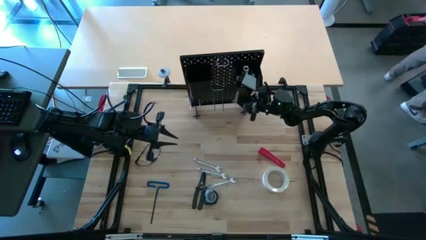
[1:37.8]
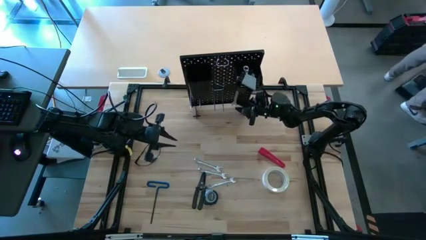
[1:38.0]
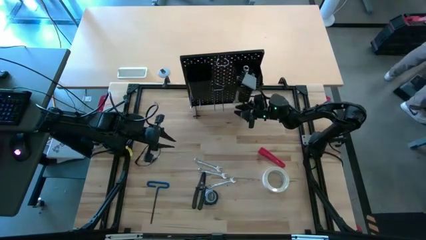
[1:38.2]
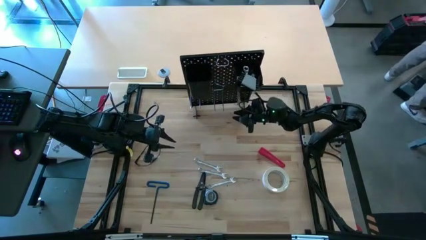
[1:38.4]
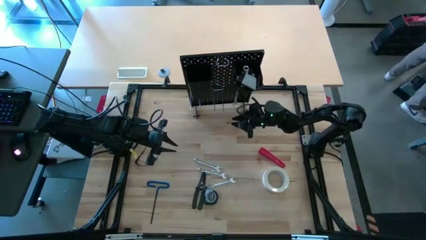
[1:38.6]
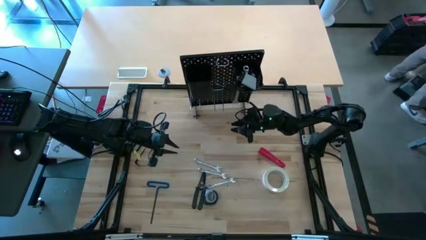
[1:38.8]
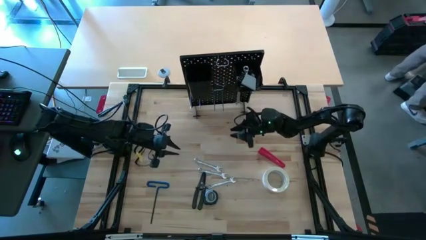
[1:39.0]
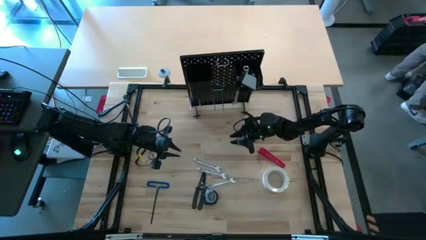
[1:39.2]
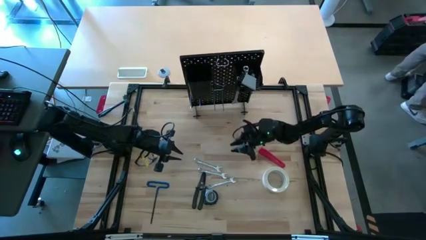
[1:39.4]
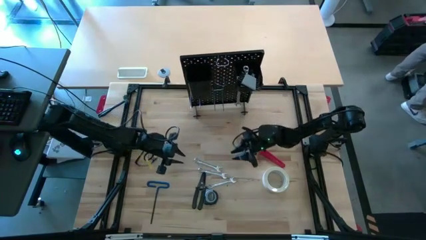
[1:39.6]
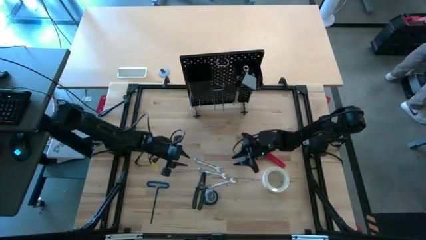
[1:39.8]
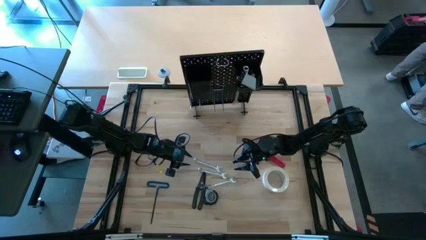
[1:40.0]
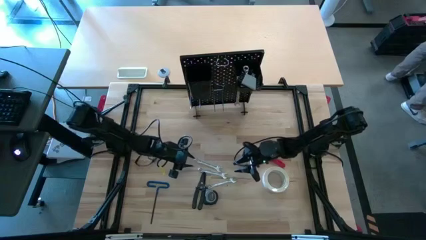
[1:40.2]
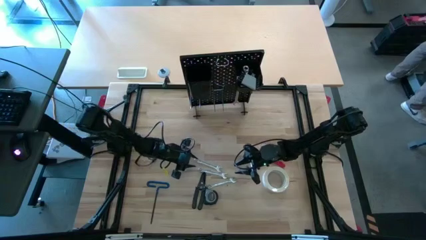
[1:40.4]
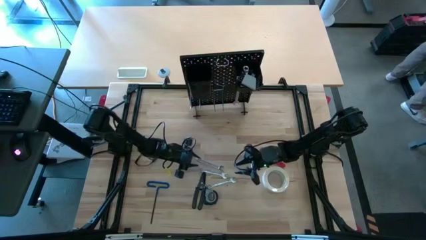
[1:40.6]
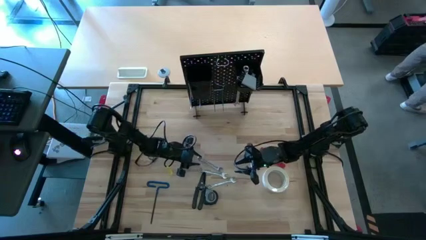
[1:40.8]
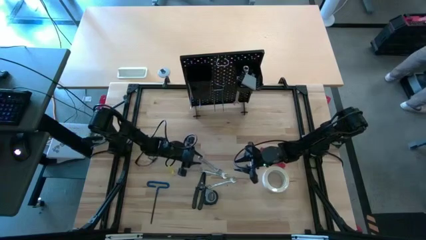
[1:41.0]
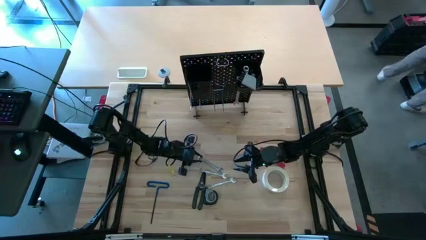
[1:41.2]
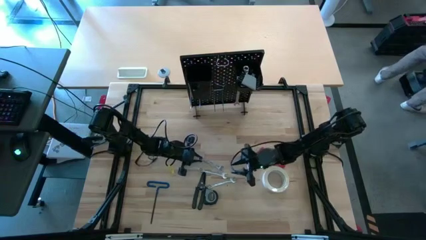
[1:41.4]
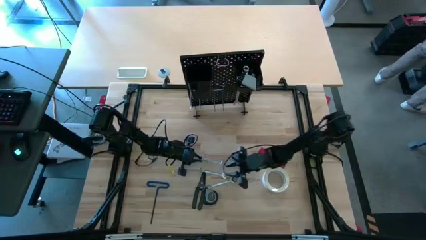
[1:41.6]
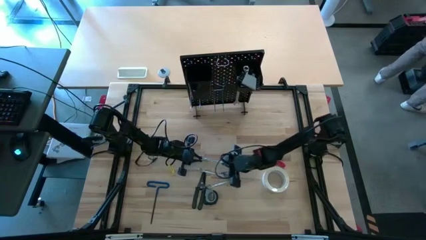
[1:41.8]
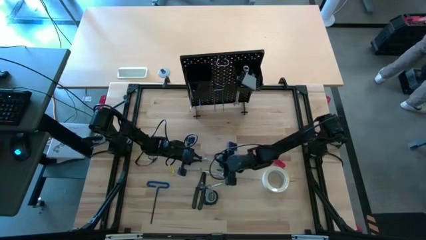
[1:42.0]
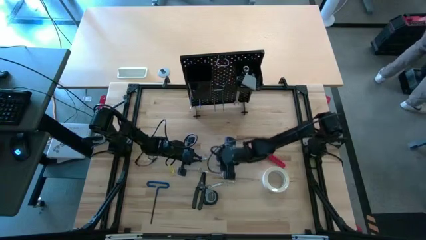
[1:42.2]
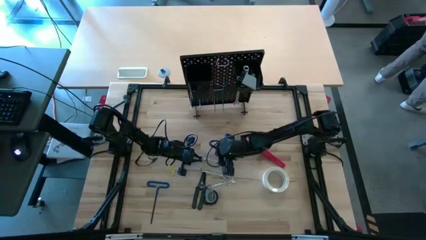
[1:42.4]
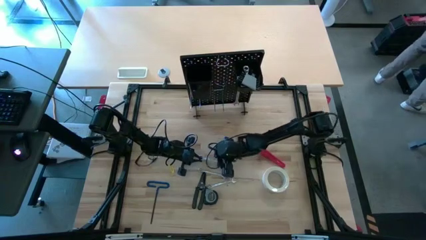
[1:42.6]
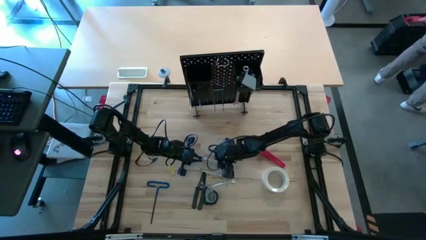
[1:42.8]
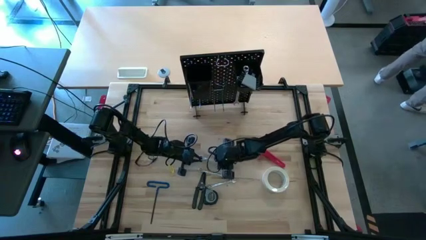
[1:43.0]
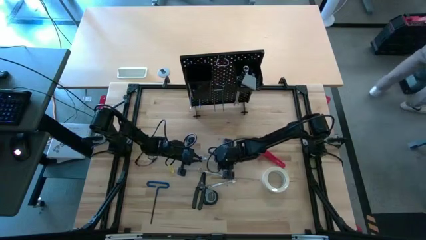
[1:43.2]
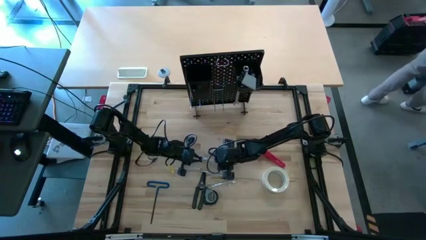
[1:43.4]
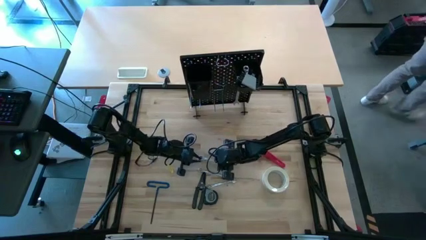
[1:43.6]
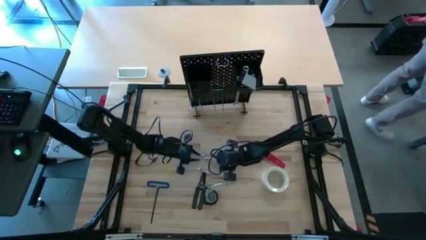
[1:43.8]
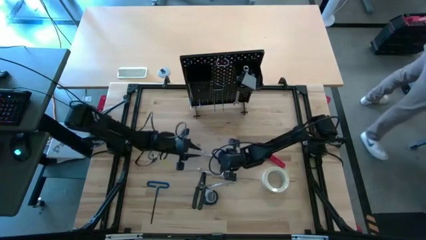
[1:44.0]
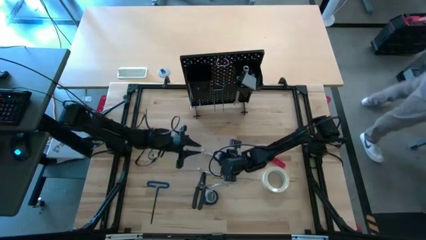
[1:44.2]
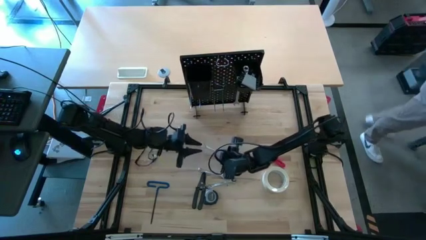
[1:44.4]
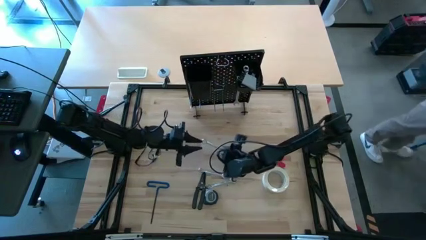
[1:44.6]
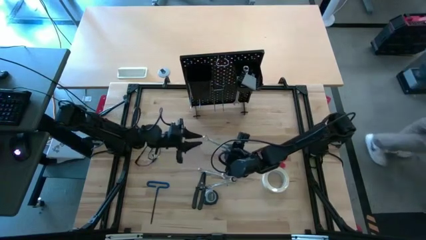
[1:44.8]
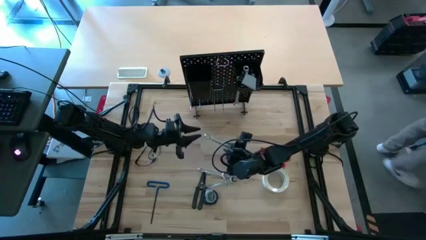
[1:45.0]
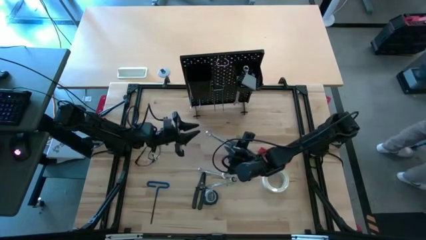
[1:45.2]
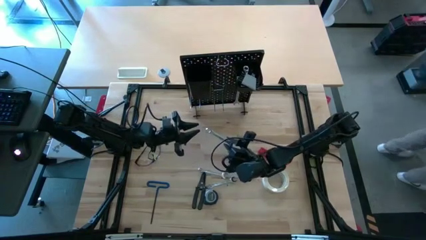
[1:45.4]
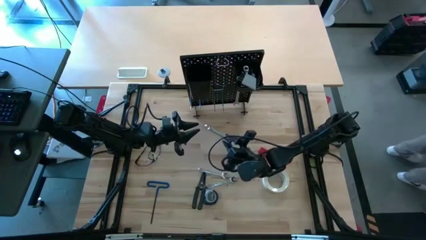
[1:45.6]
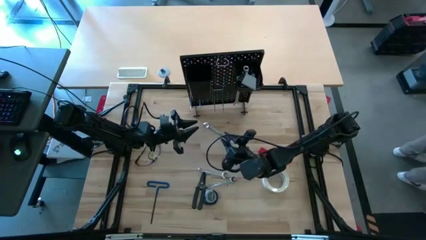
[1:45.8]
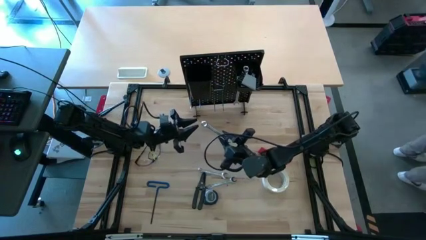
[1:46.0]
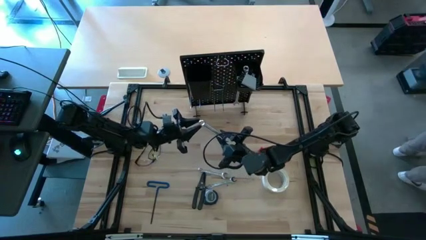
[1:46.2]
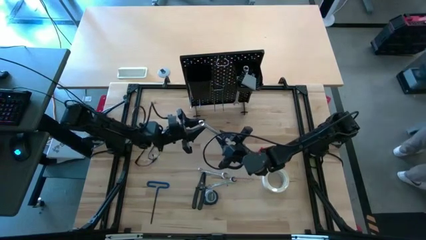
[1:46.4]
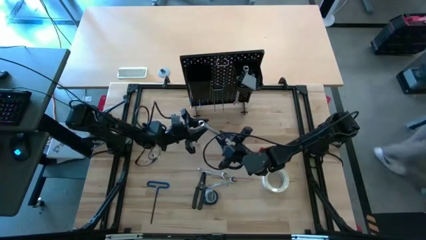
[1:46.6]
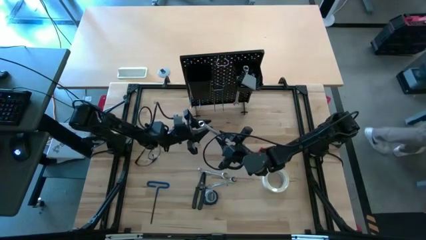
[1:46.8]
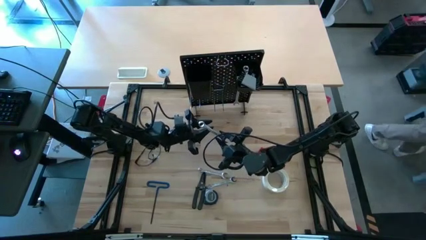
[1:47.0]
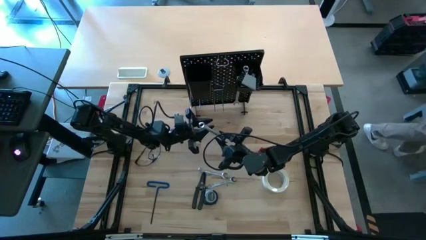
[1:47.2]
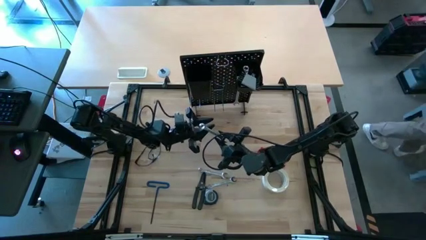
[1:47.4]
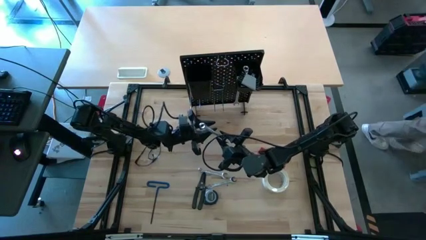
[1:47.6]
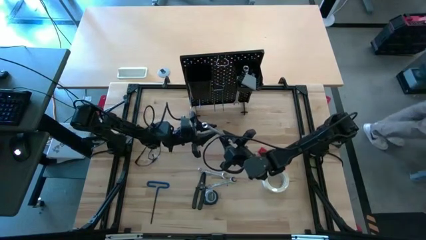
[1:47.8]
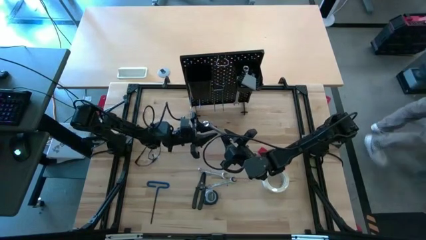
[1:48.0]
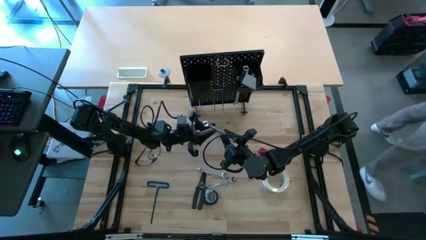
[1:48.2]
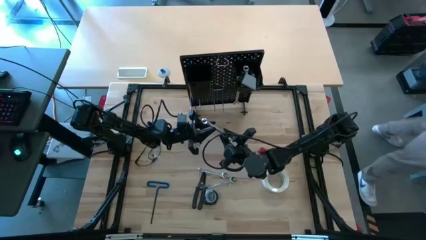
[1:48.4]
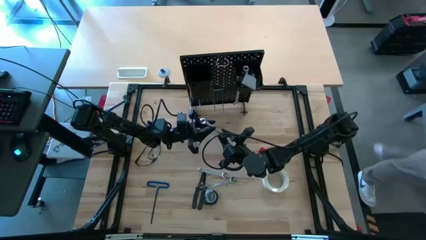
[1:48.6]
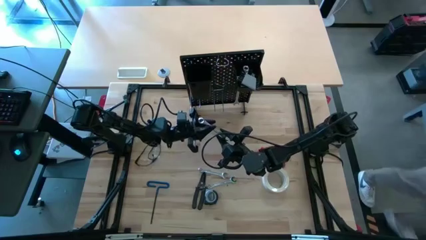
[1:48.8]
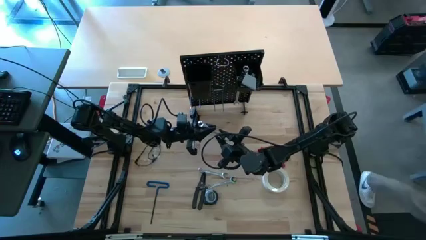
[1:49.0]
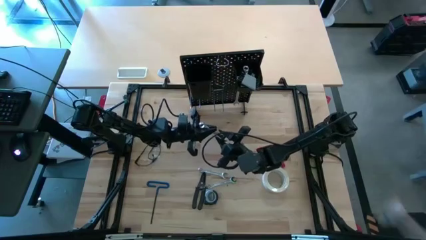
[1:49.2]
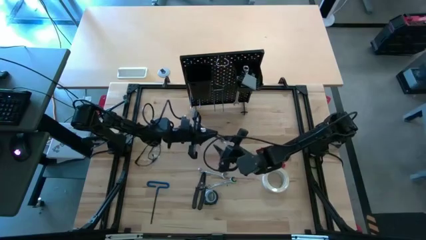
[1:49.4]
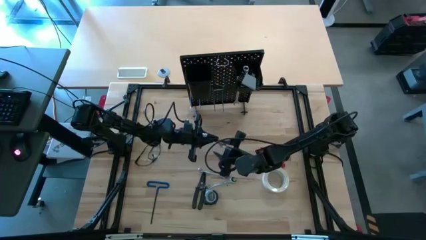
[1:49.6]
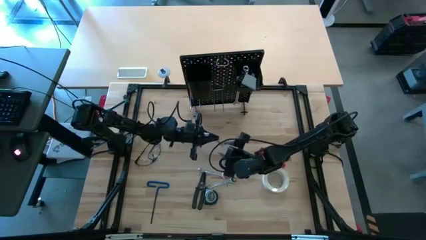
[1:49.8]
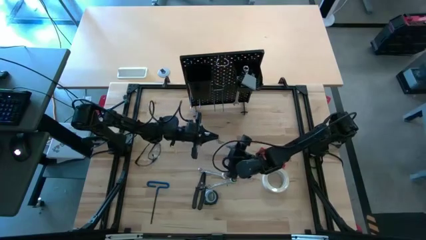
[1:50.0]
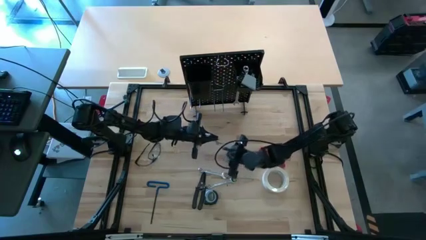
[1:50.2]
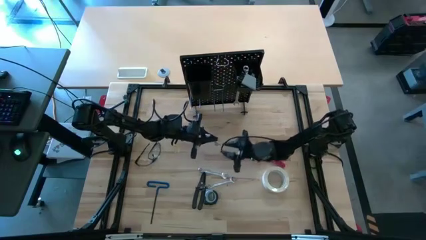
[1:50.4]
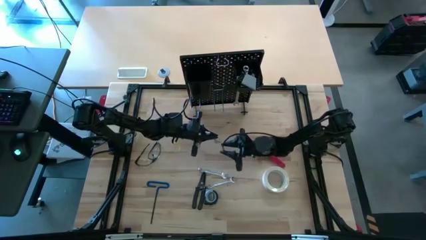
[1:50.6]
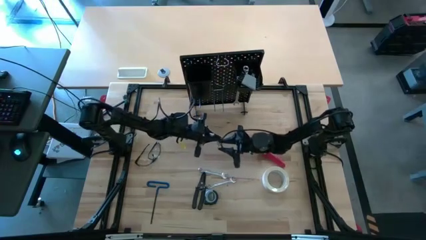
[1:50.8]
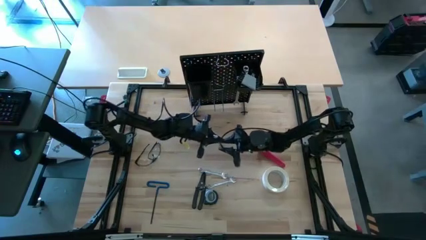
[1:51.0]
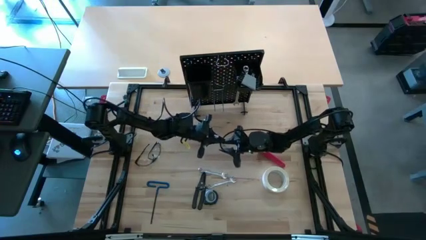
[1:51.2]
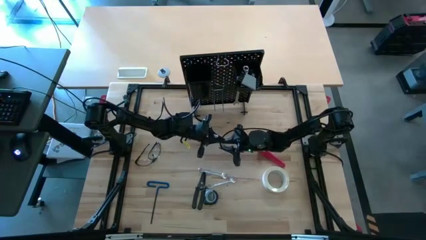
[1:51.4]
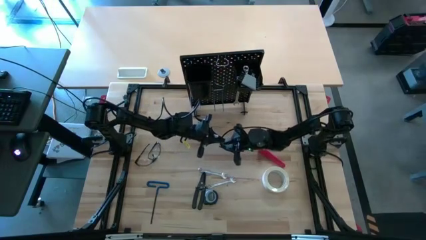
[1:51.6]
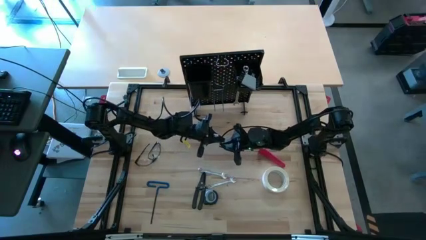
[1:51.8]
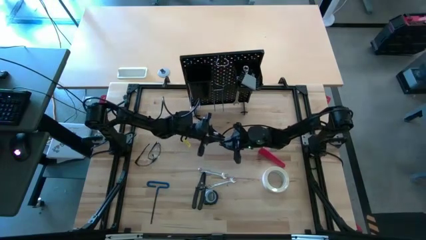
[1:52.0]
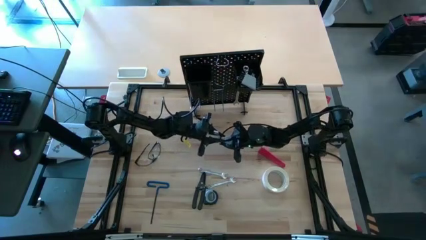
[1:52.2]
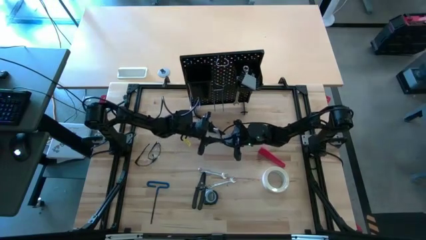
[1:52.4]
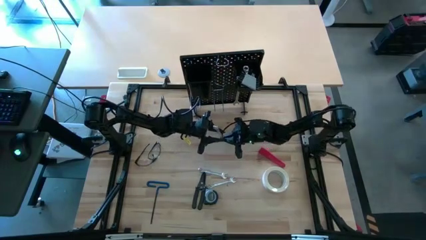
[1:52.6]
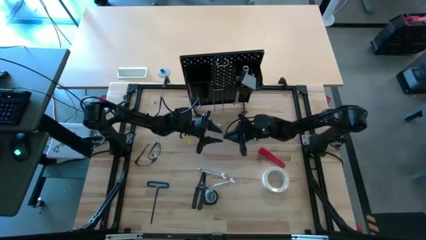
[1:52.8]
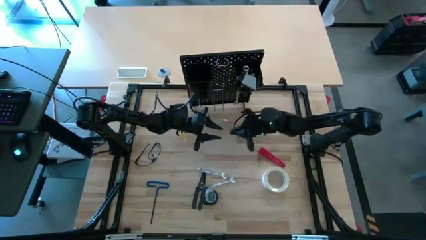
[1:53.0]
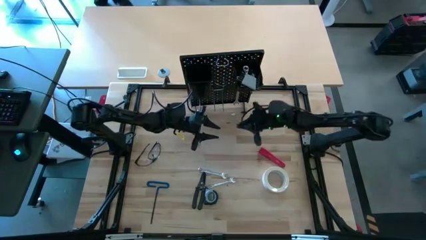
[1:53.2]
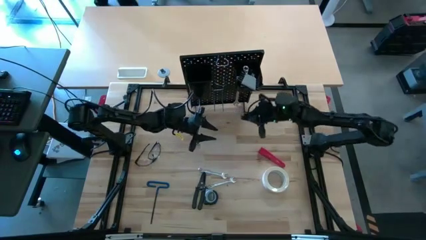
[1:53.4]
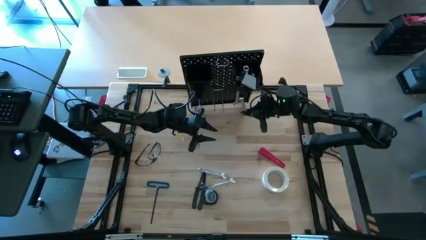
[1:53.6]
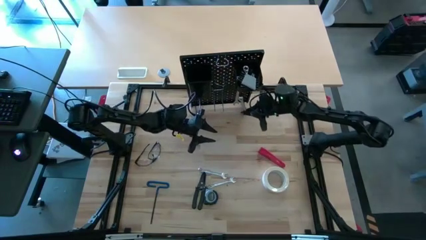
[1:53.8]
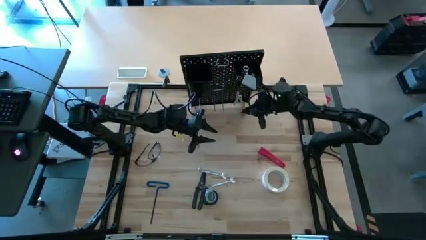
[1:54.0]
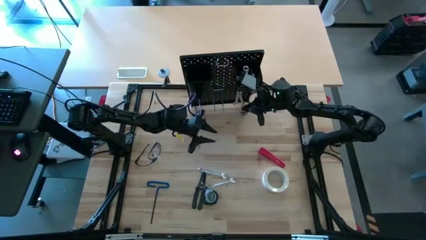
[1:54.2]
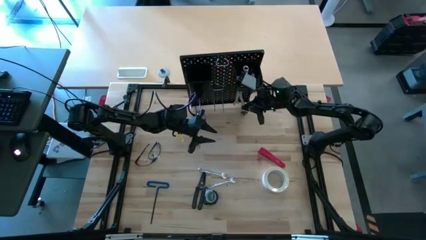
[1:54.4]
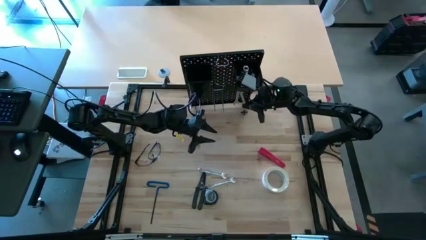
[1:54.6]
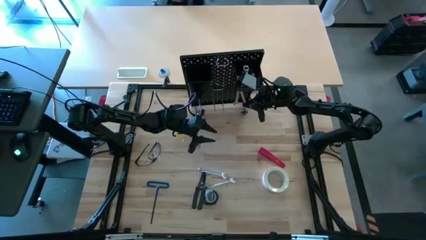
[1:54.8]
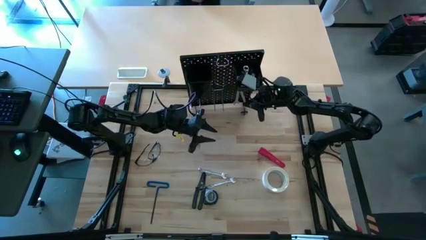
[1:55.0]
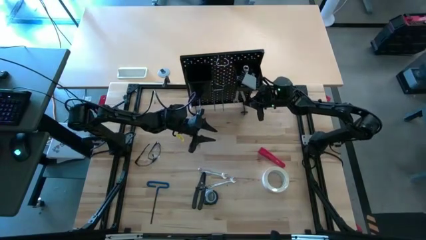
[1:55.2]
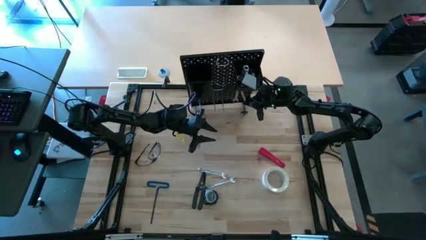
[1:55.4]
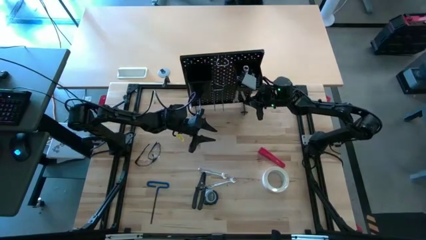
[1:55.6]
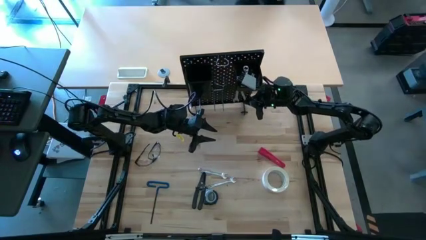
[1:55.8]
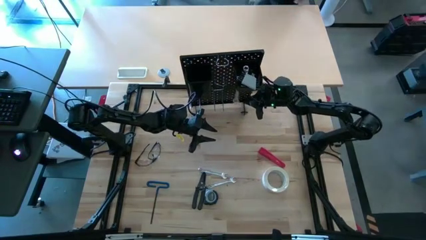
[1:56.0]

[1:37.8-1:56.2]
Task: Hang tools onto peg board
Hang the top silver wrench on the pegboard
